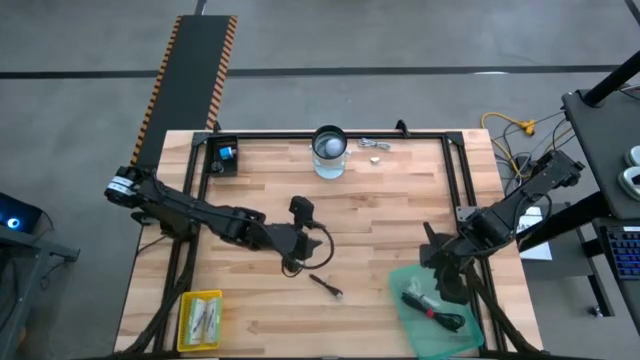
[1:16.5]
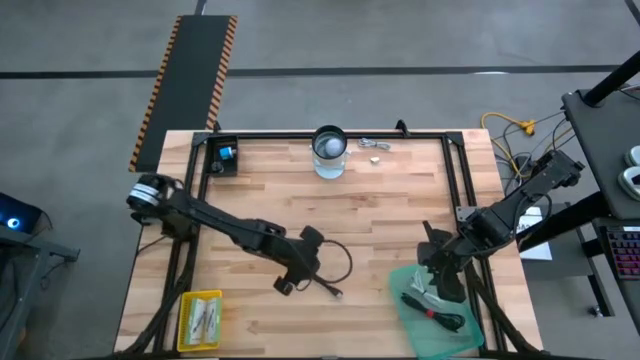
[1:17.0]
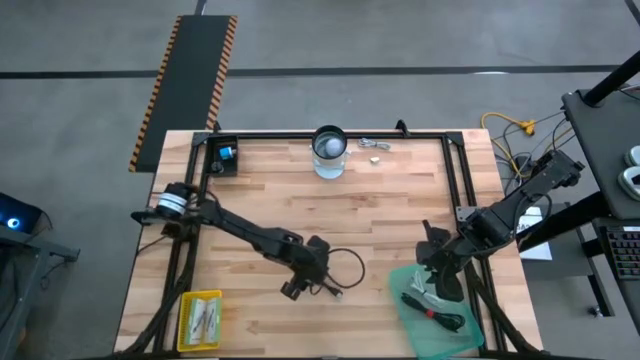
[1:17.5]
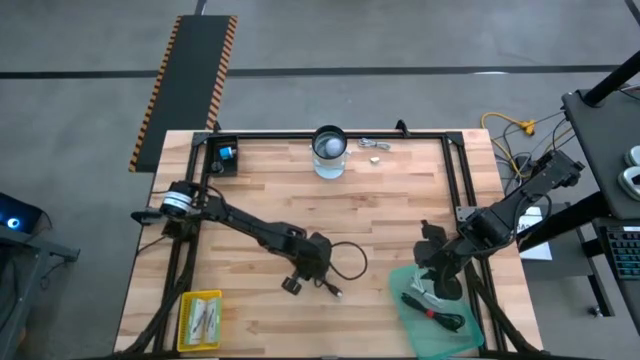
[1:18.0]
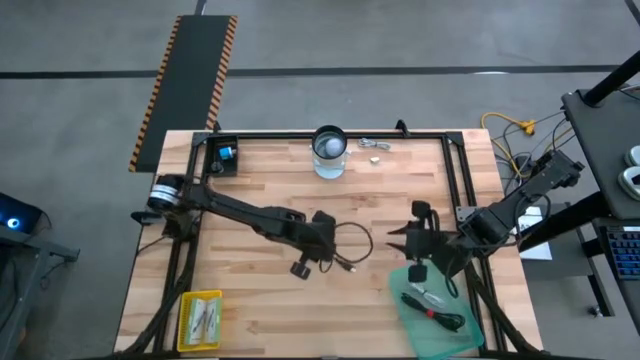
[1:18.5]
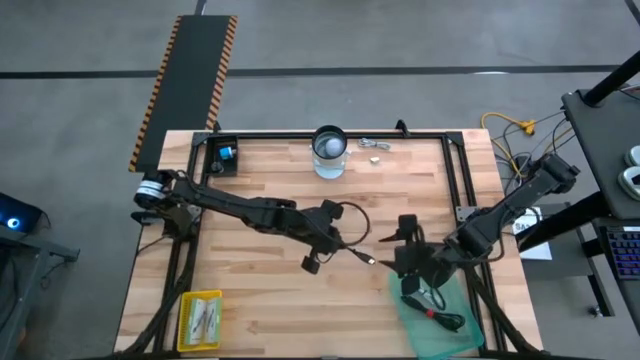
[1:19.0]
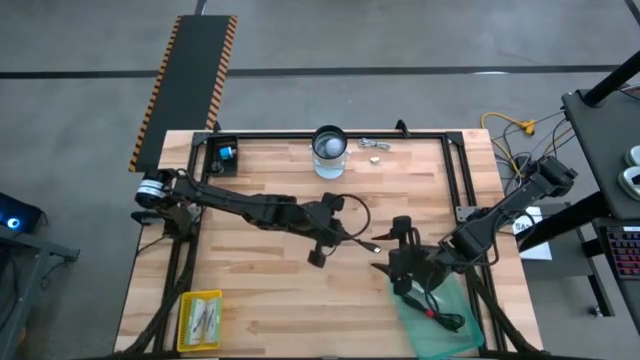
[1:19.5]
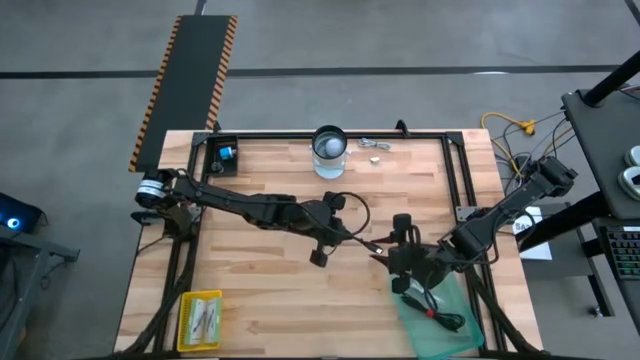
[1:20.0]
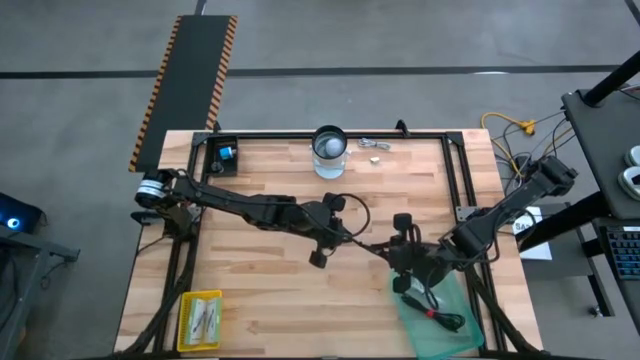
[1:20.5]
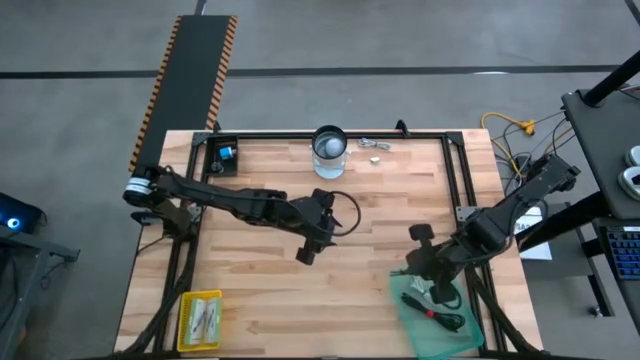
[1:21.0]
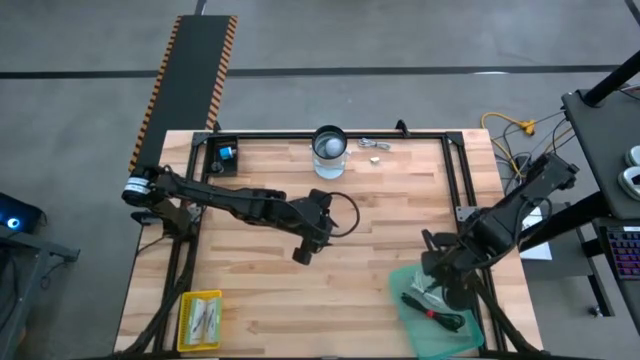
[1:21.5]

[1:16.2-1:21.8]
Task: Pick and place items into bin
Put the black usb cable into the green bin

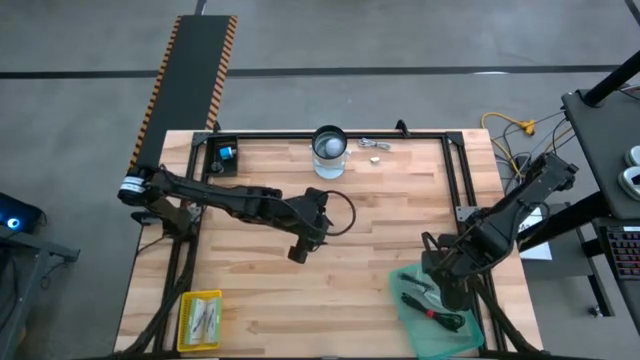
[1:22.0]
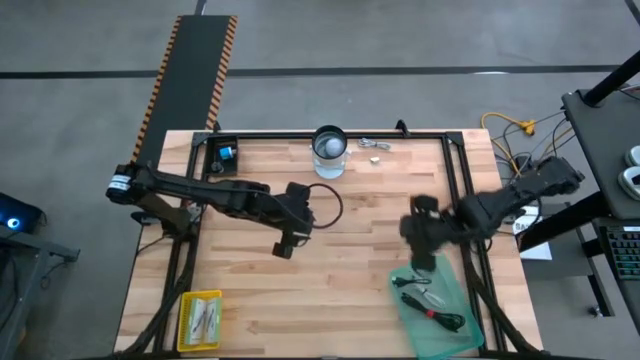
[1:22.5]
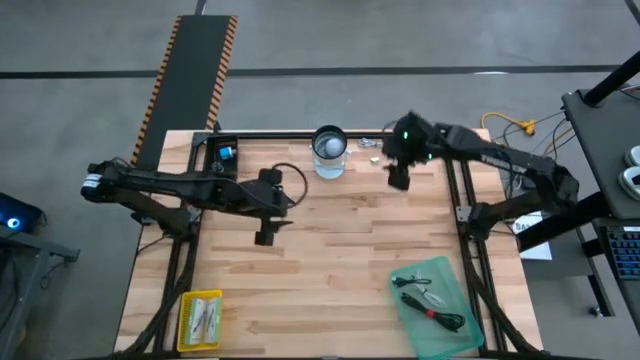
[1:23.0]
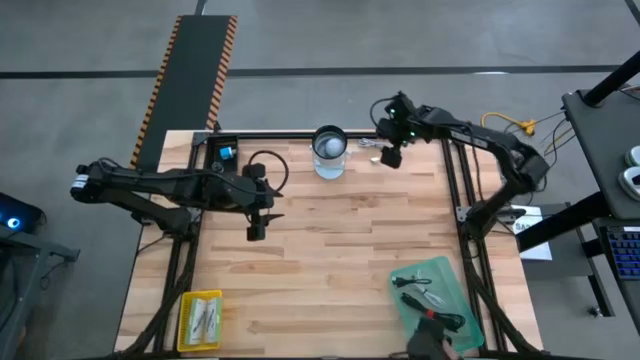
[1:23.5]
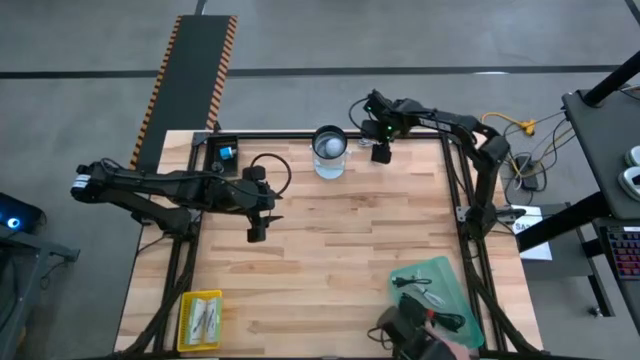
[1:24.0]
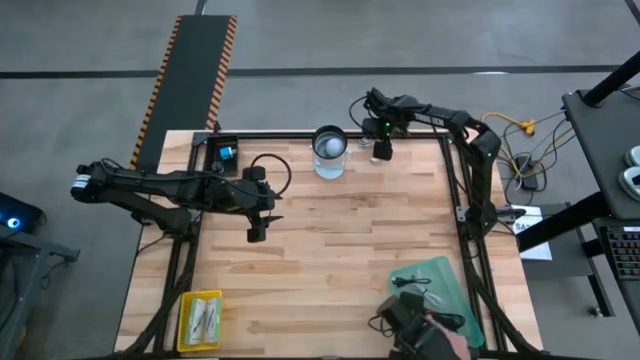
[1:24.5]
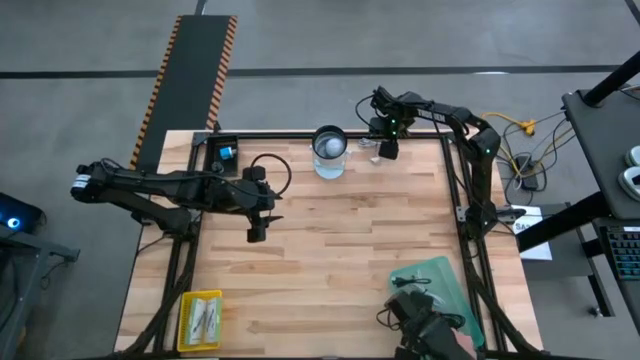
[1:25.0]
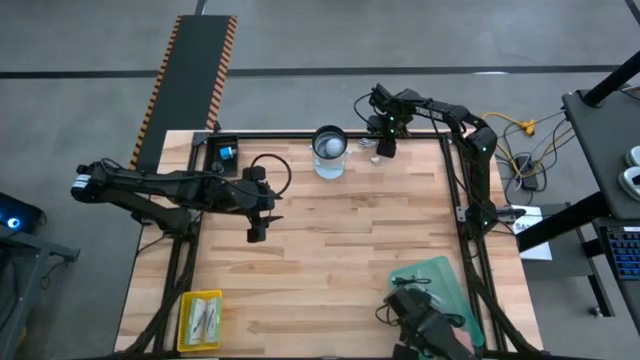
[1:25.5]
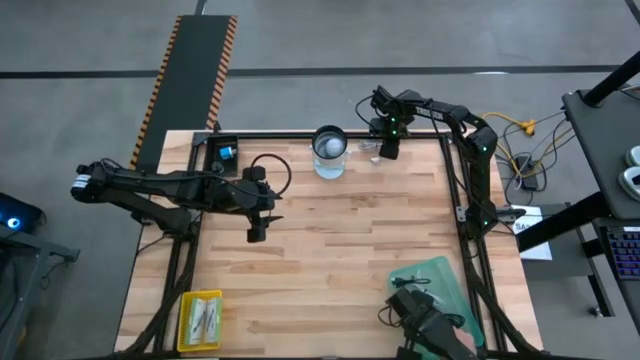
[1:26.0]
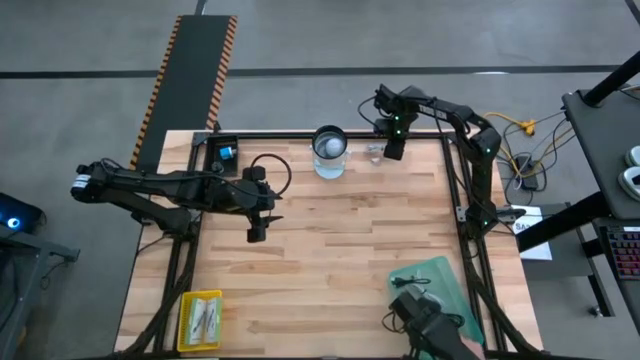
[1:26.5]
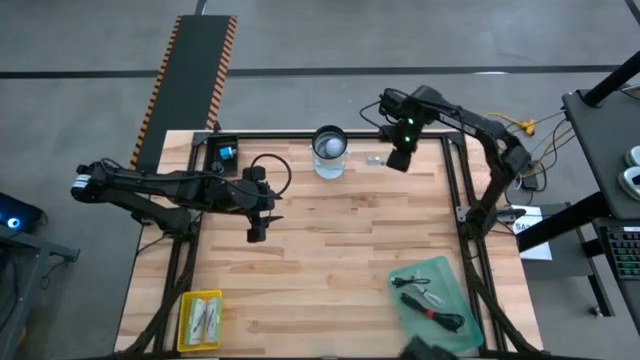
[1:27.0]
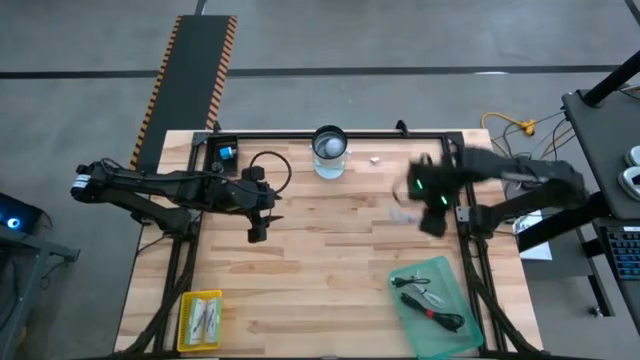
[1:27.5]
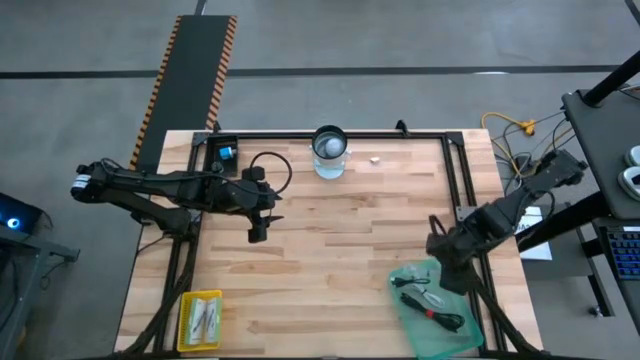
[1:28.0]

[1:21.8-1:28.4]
Put the white usb cable into the green bin

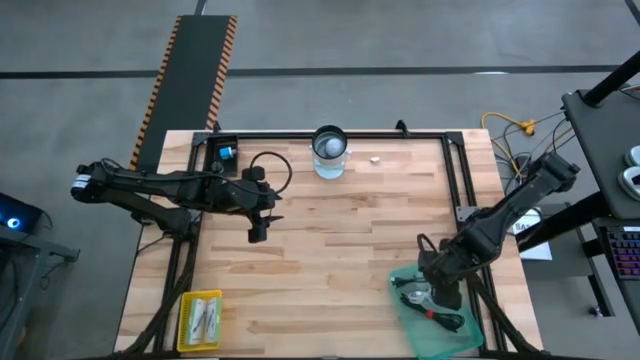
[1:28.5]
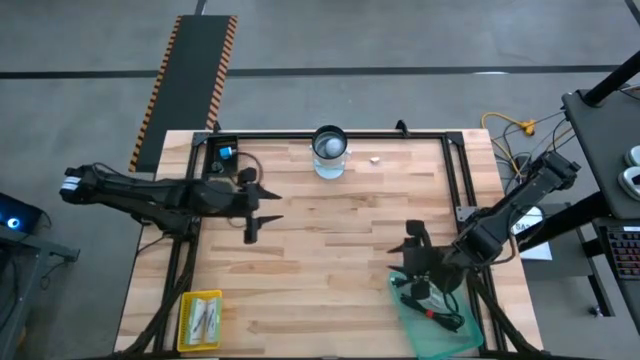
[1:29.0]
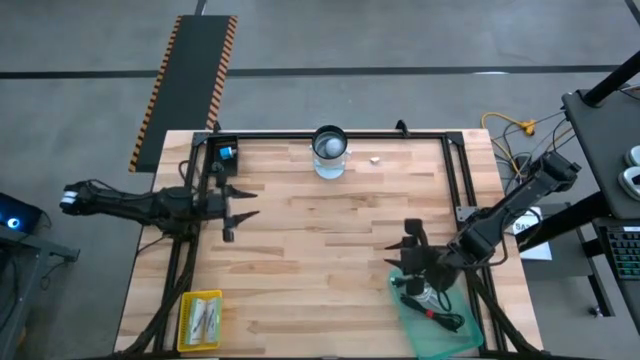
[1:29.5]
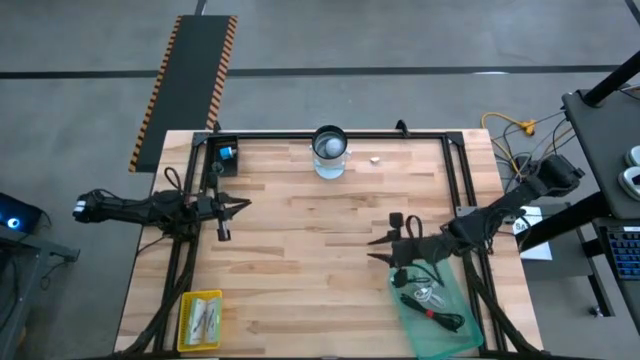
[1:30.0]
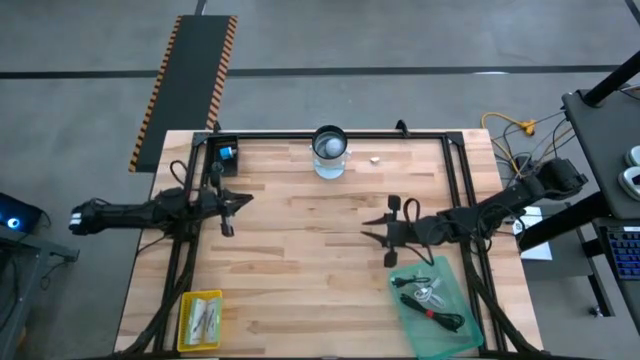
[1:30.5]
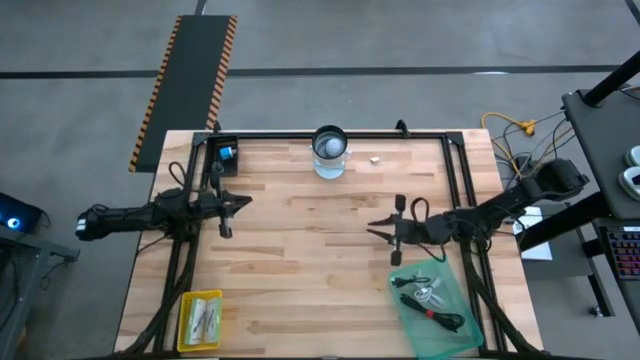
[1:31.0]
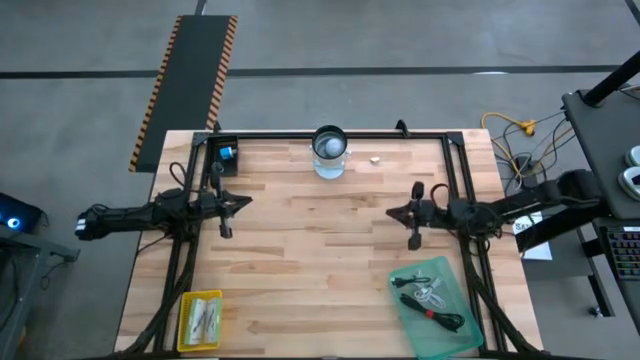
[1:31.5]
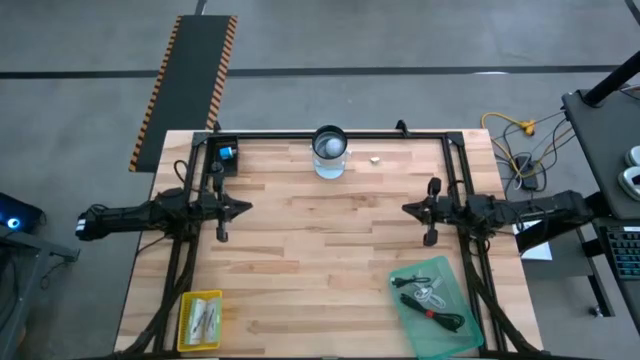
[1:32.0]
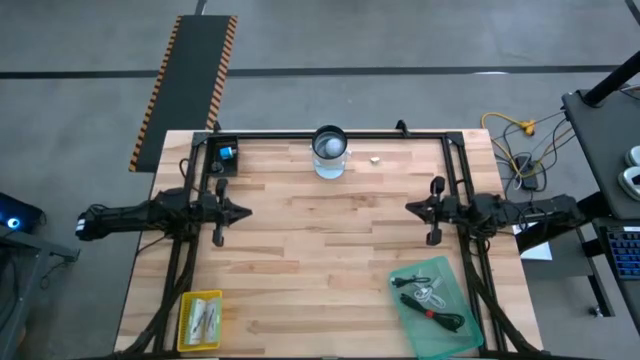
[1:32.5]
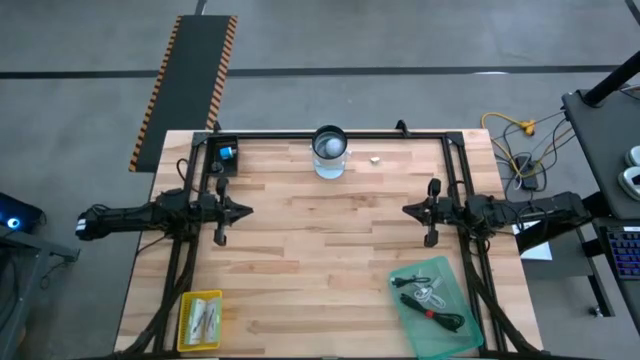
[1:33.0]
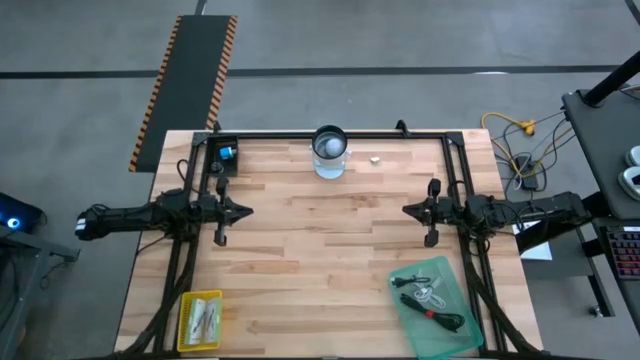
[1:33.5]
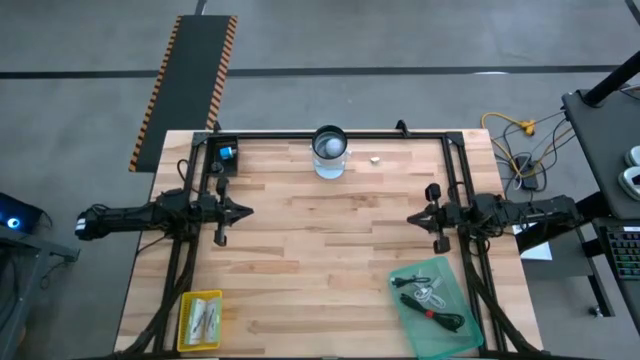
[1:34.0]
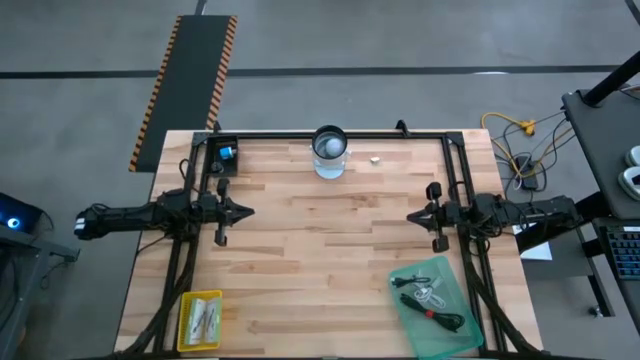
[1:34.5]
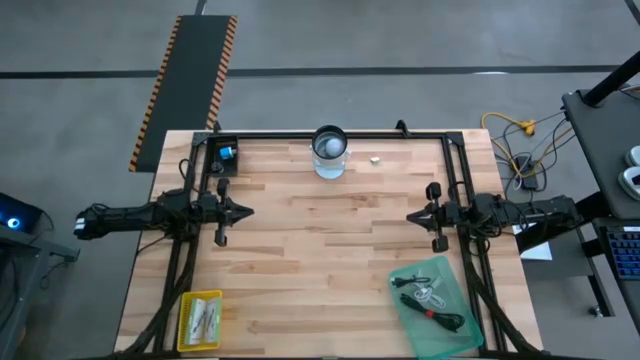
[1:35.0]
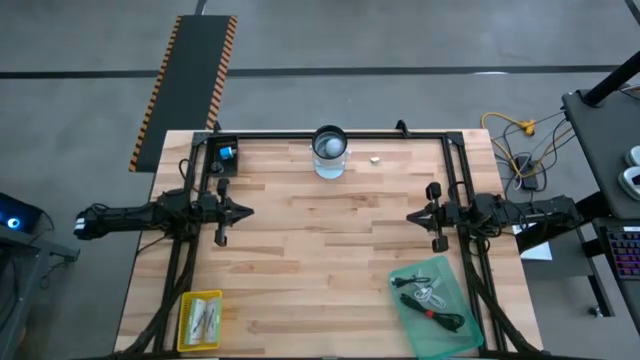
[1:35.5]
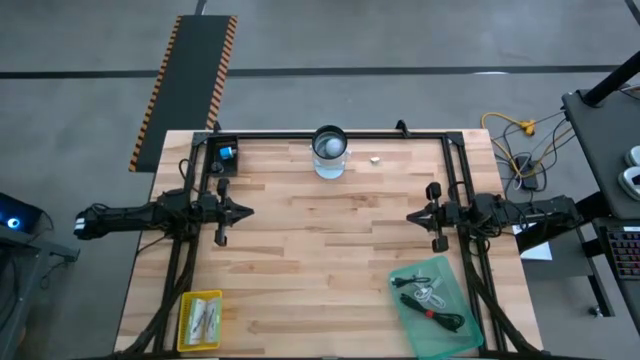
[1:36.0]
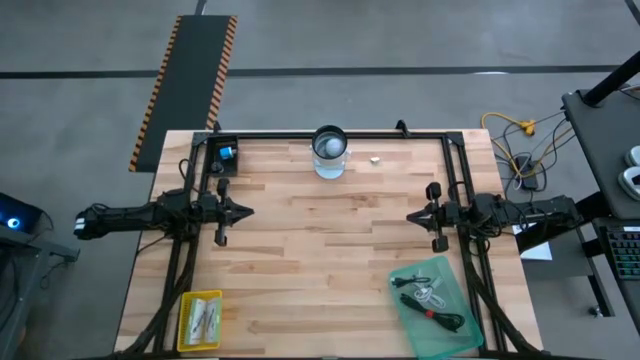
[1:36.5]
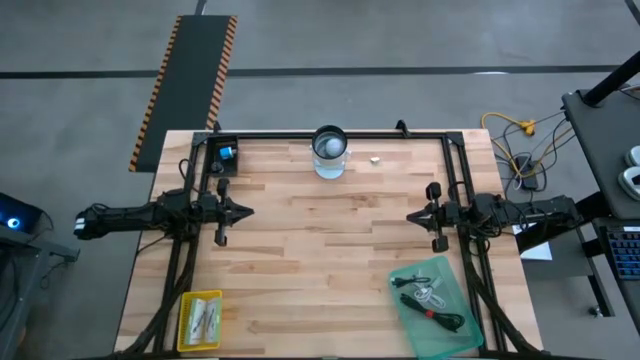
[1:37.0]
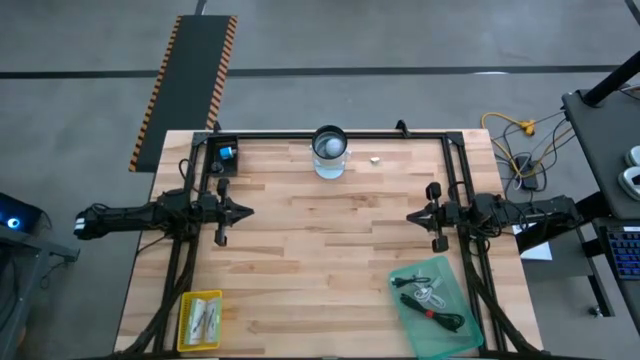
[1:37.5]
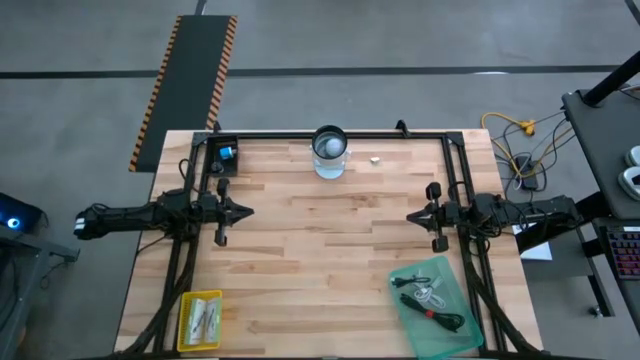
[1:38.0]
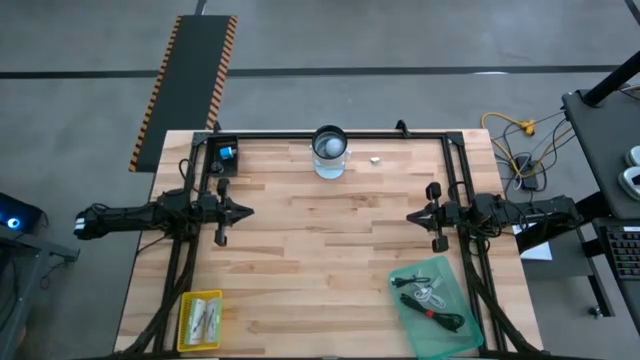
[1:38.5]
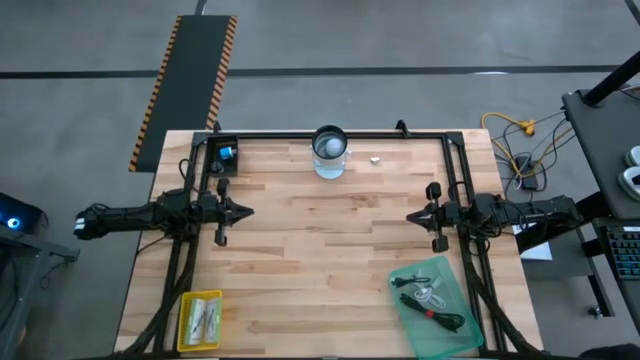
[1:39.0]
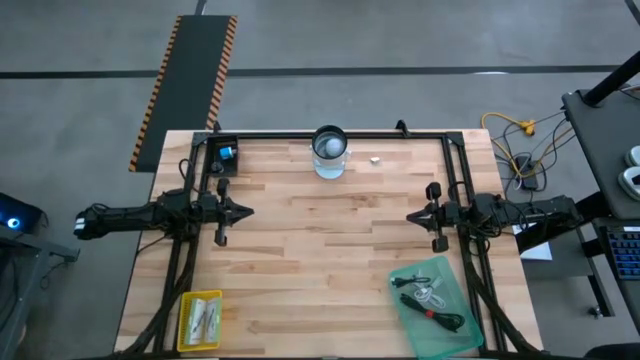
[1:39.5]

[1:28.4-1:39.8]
Return to Home Position
